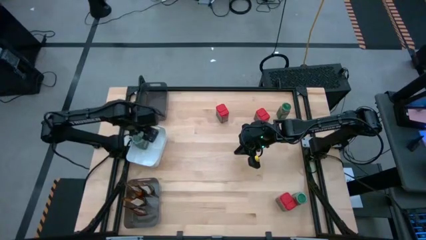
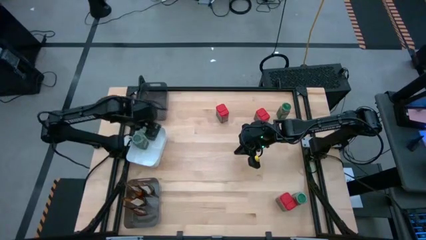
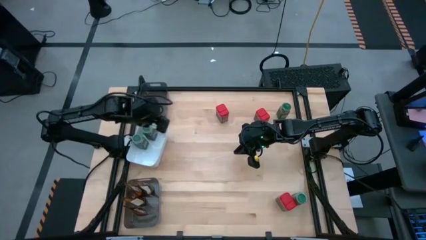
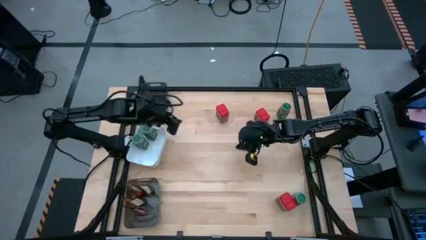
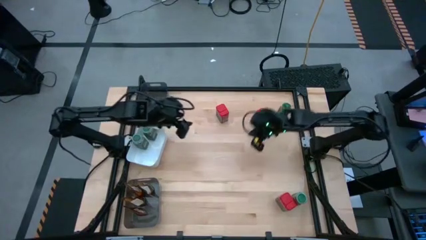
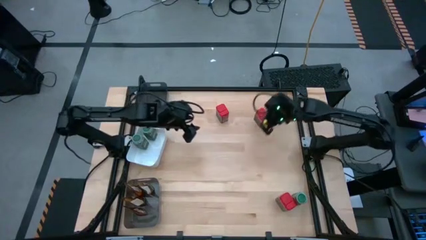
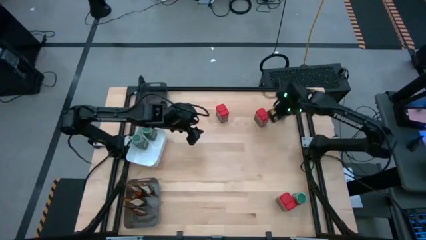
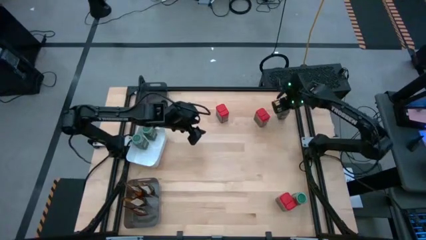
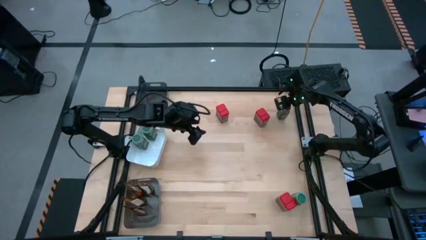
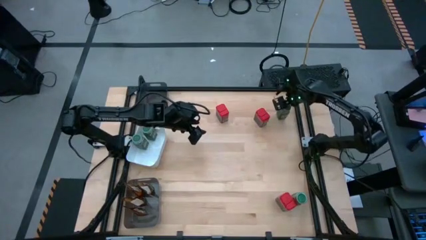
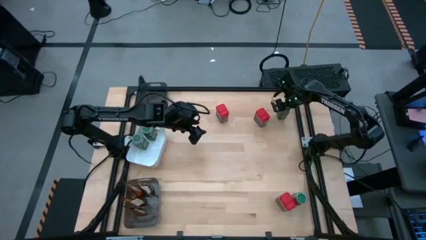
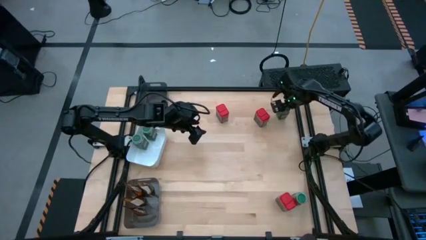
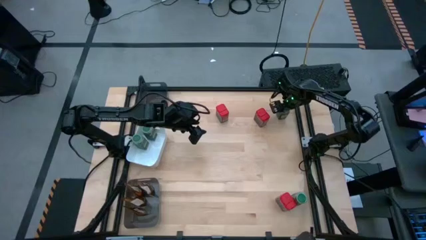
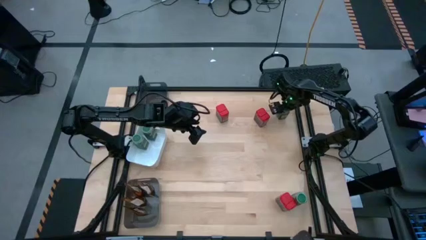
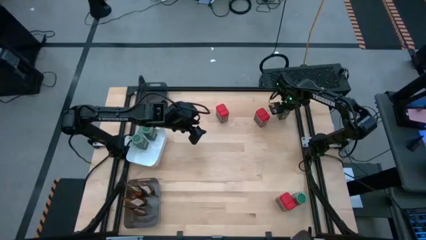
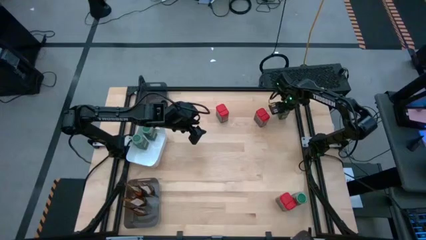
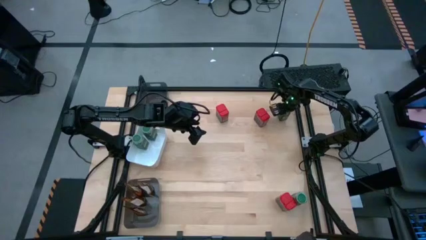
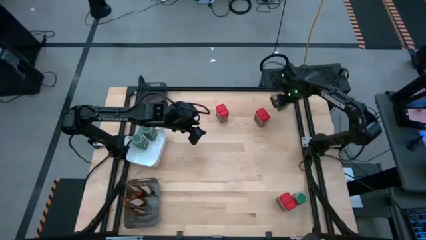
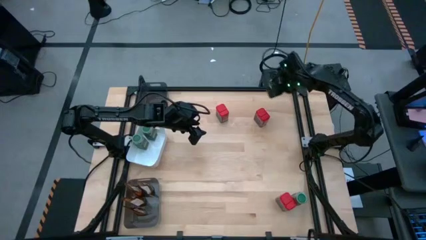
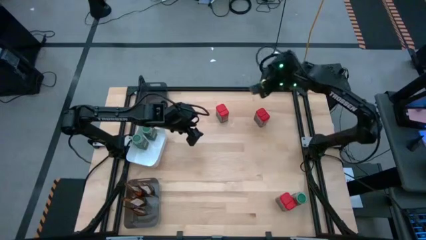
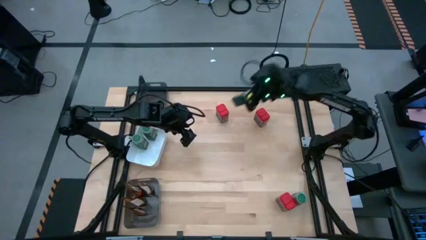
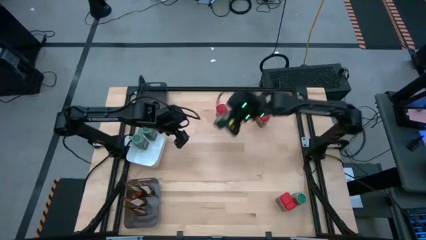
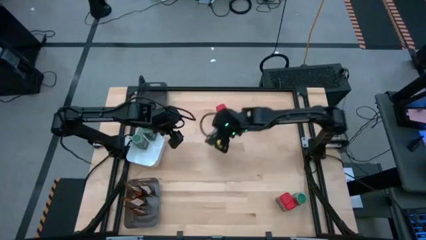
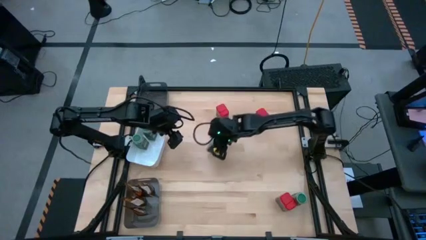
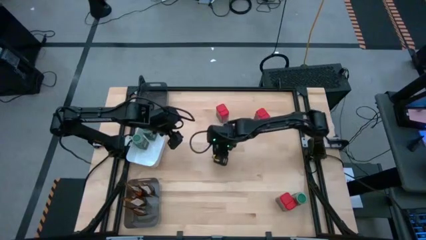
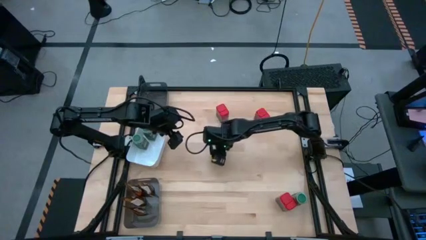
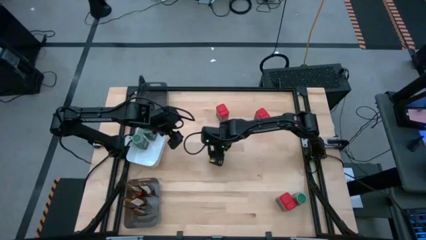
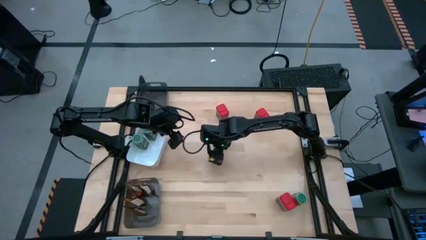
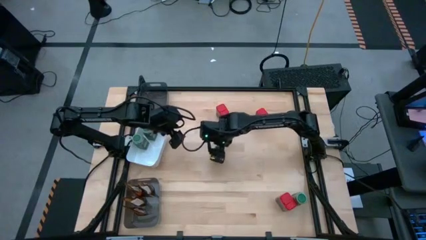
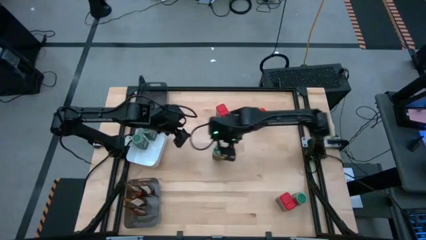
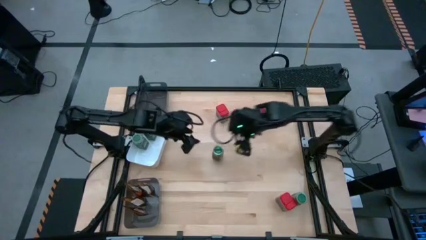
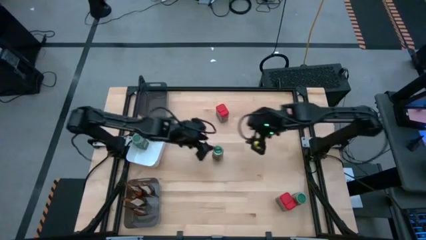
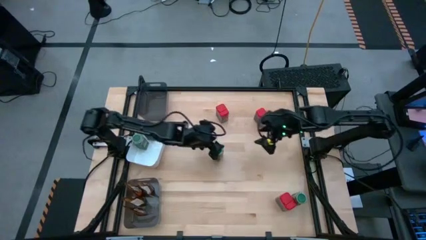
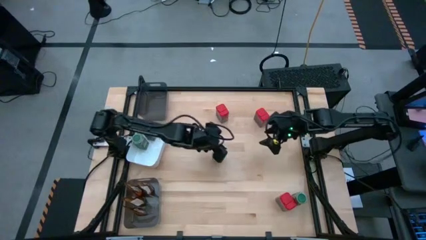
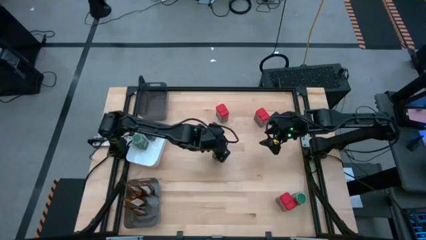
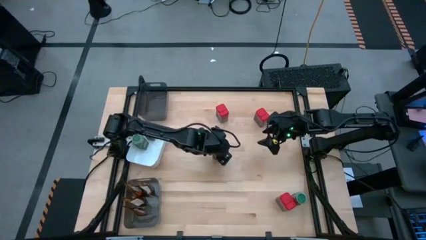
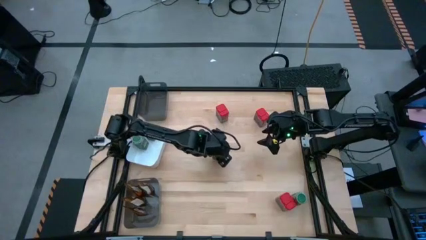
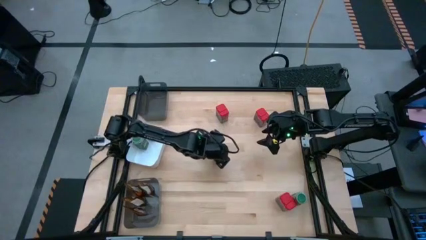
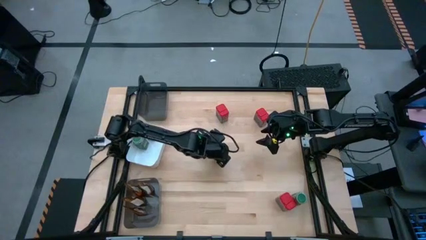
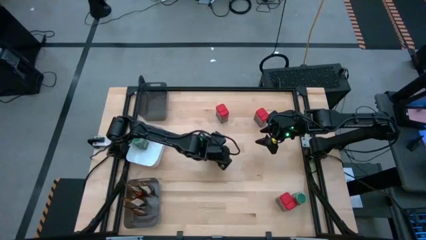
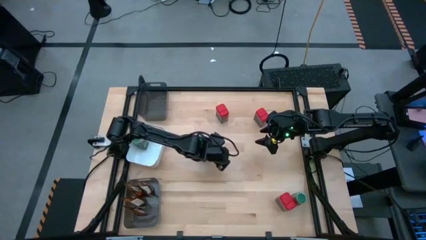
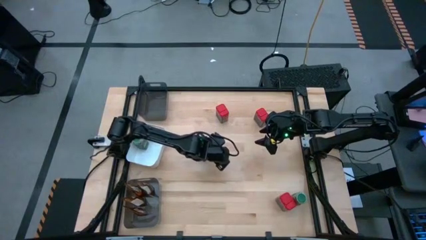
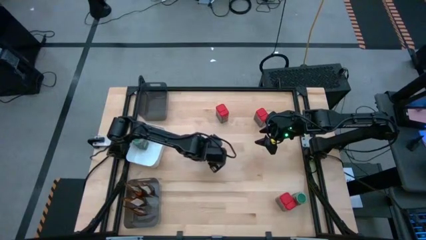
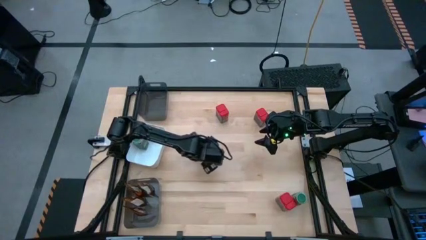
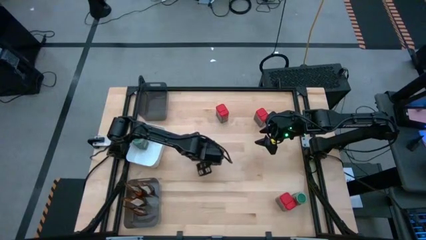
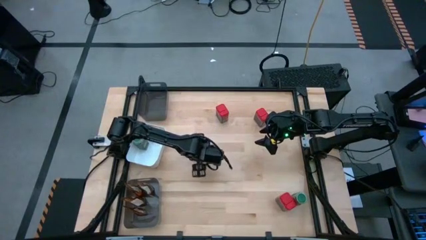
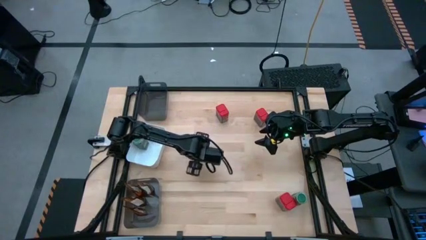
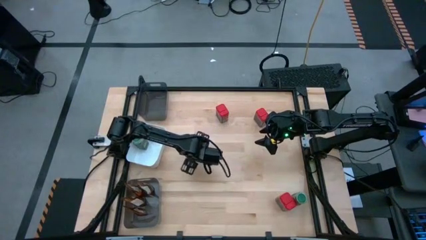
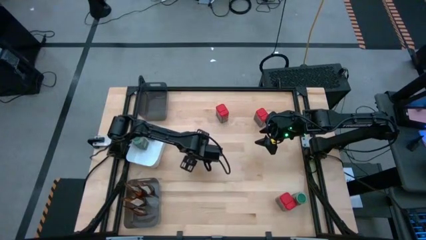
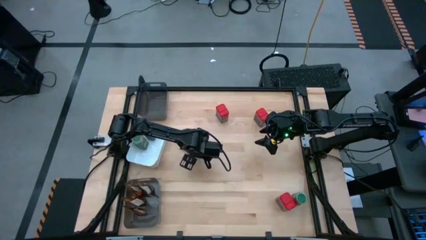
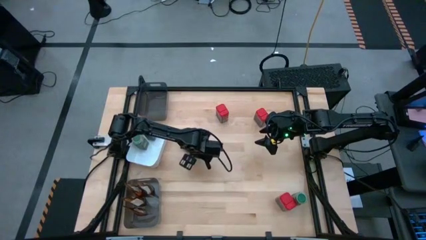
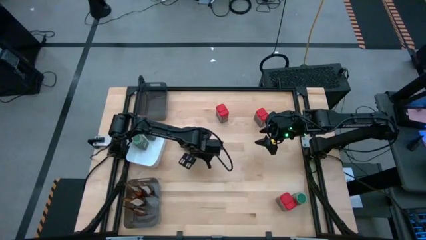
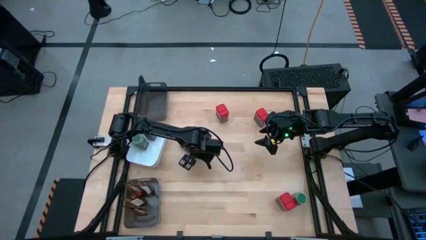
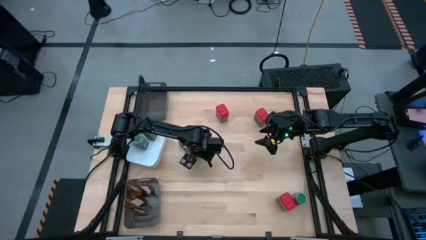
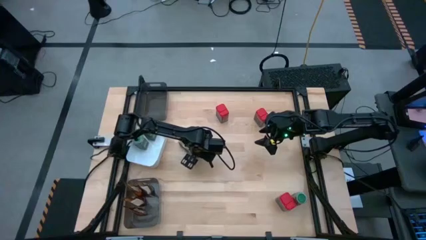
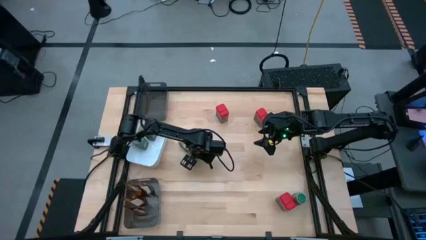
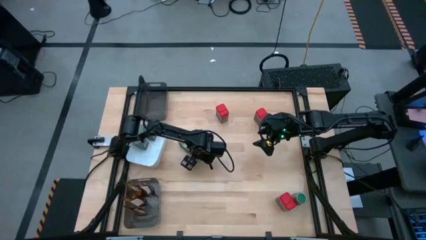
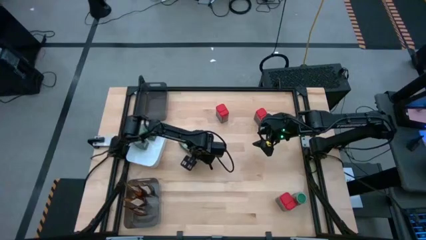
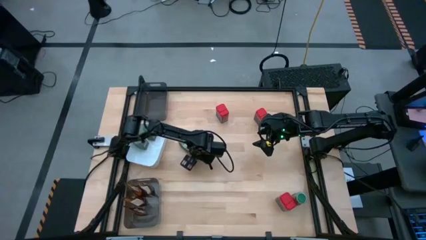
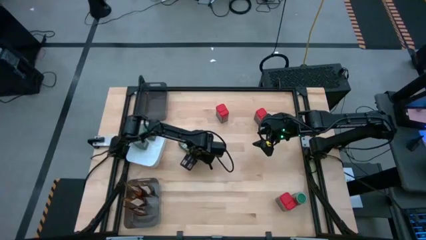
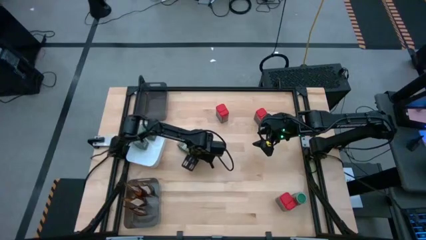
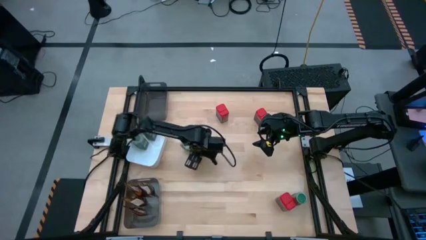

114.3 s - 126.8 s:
Task: Sort spices by type
Put the green seasoning bottle into the white bin

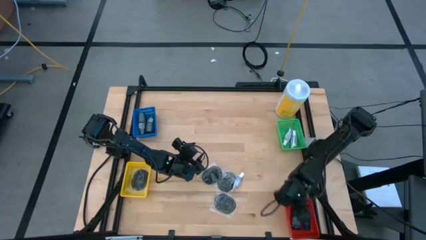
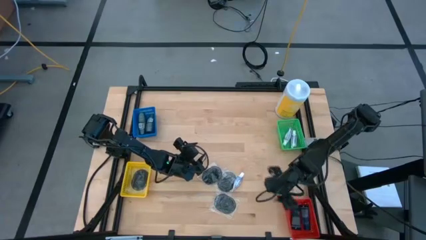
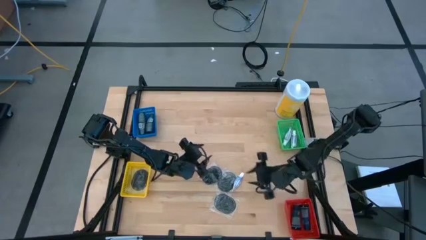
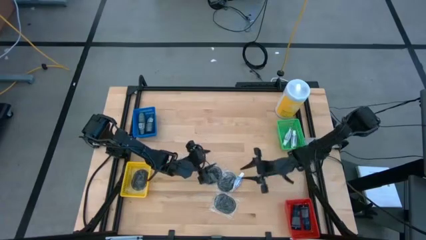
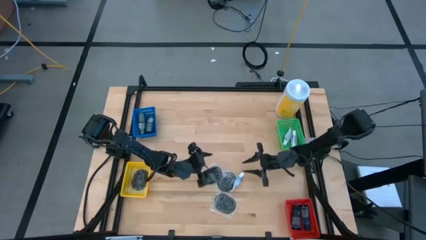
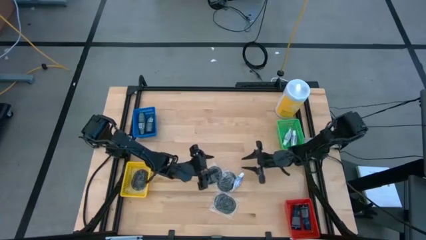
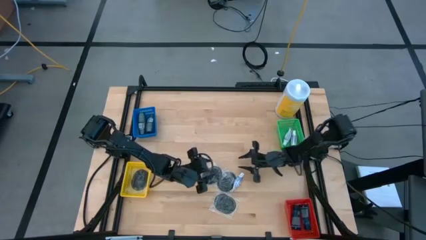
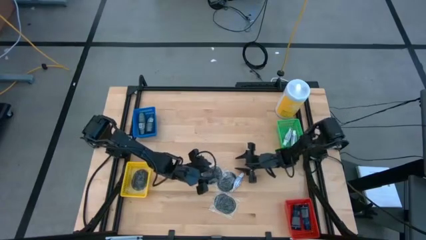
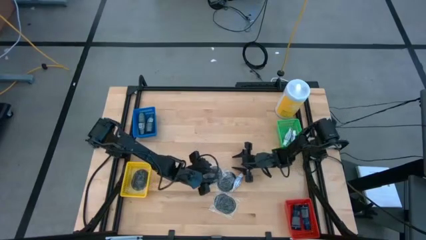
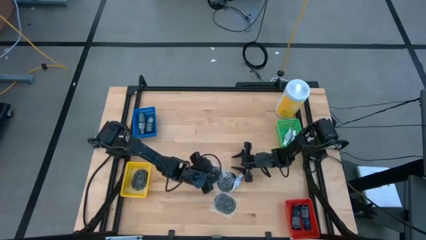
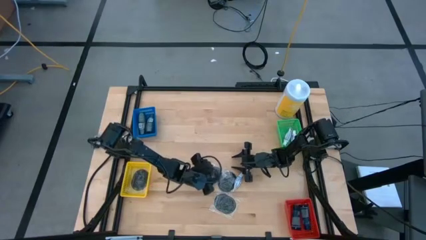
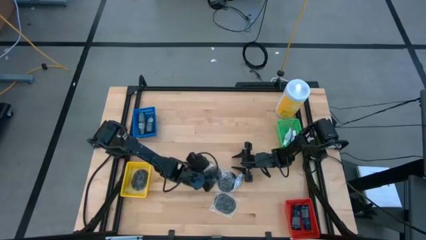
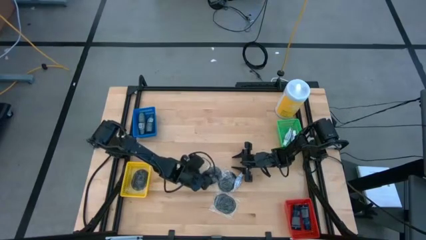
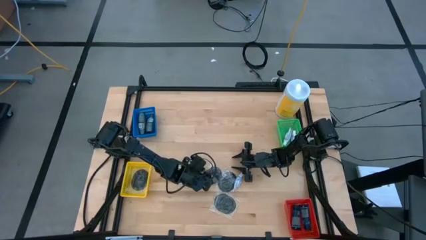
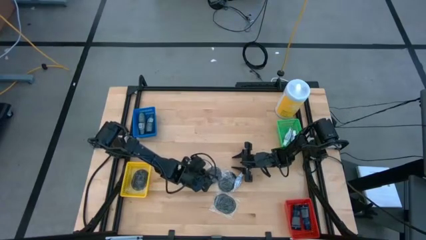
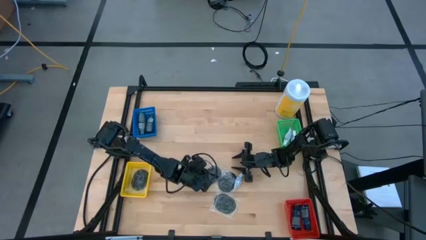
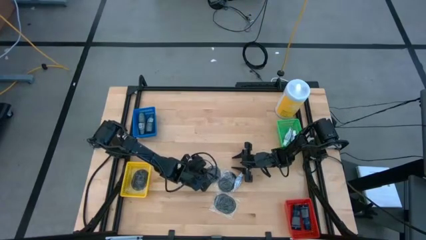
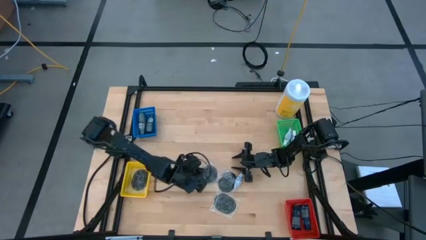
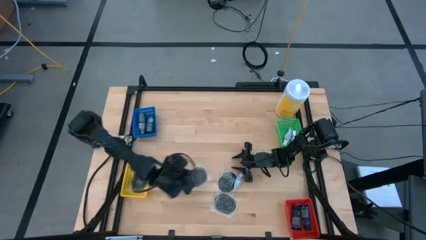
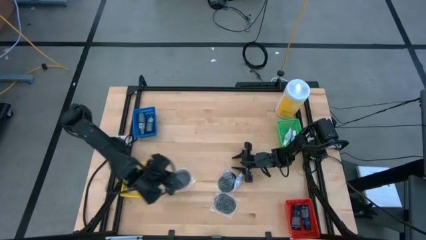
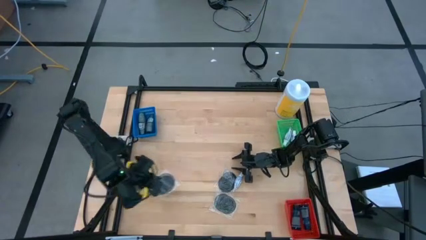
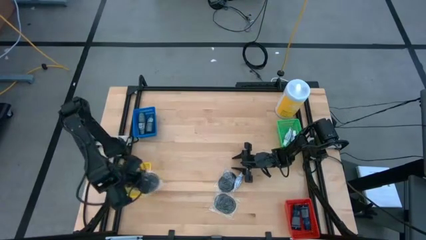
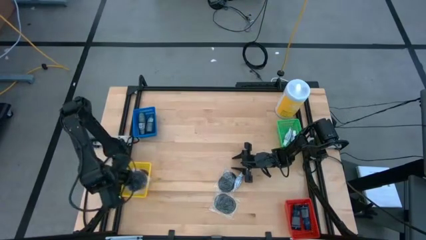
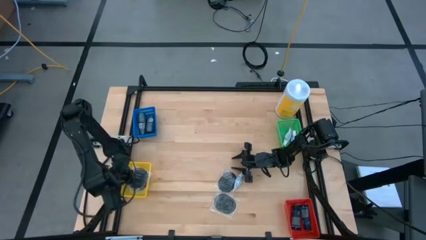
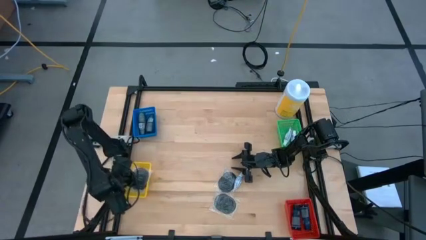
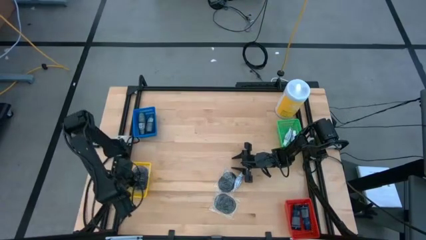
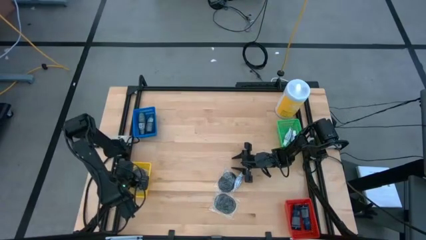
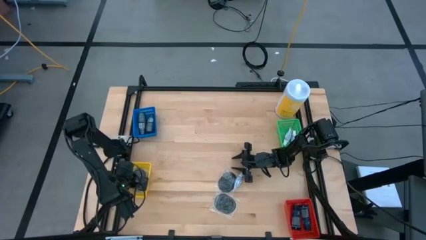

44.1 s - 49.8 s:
Task: Pick & Place Travel size toiletries
Put the black hairbrush into the yellow bin
